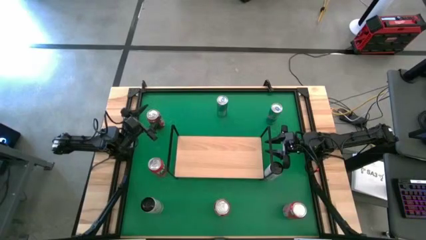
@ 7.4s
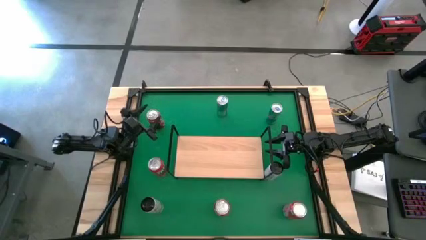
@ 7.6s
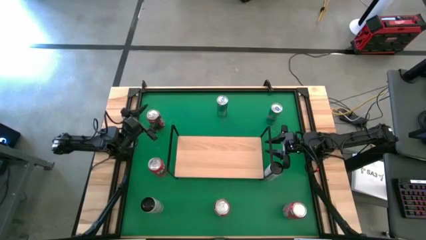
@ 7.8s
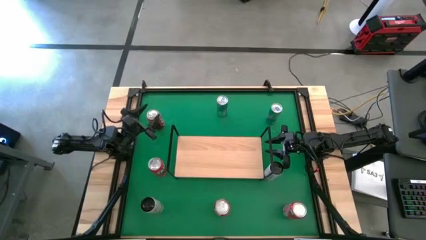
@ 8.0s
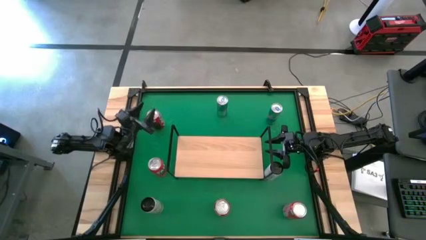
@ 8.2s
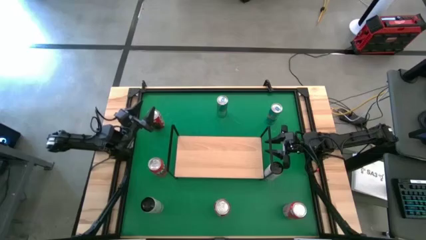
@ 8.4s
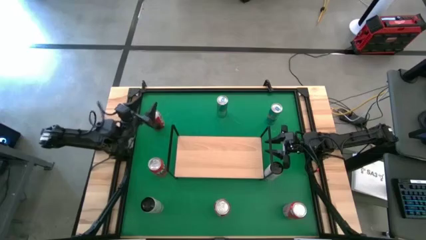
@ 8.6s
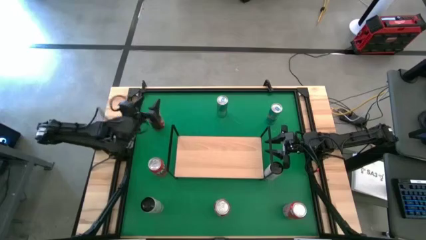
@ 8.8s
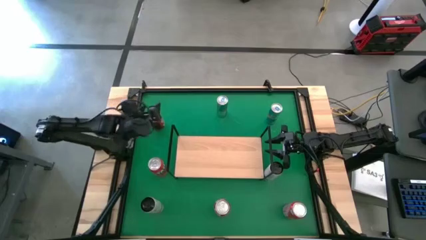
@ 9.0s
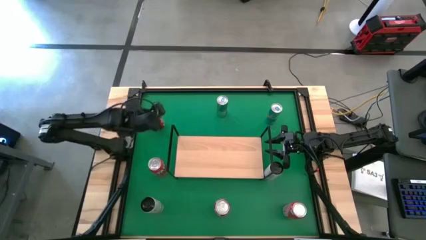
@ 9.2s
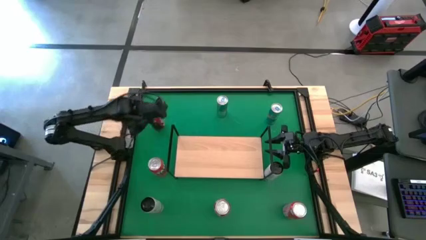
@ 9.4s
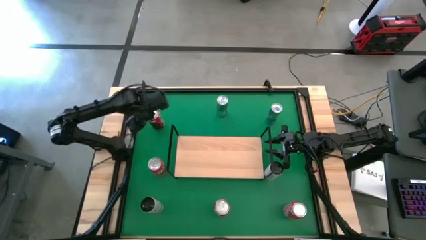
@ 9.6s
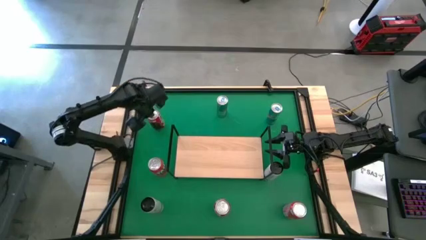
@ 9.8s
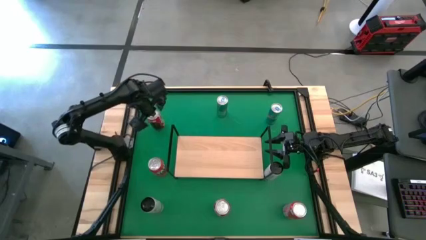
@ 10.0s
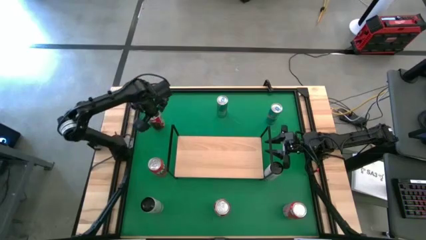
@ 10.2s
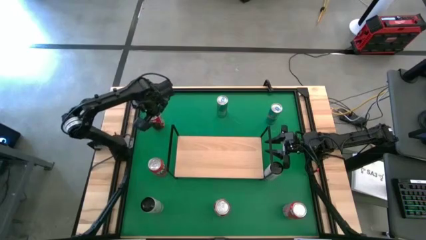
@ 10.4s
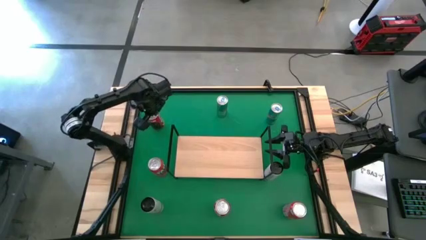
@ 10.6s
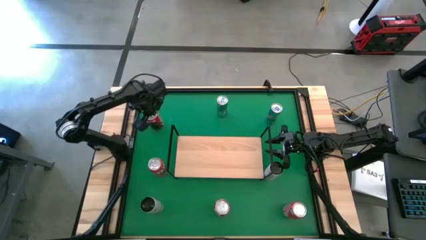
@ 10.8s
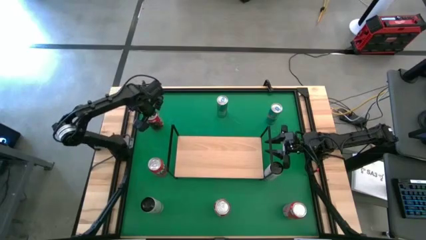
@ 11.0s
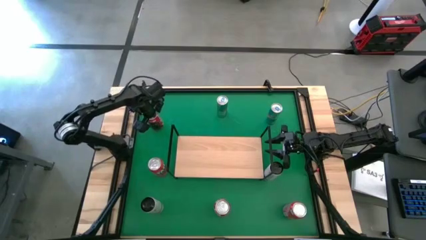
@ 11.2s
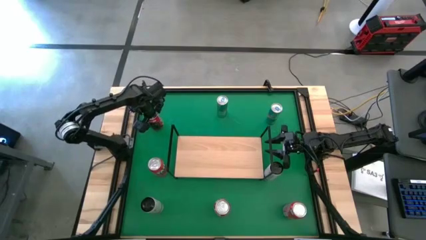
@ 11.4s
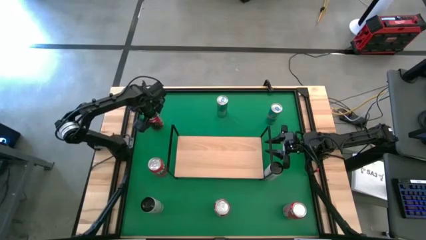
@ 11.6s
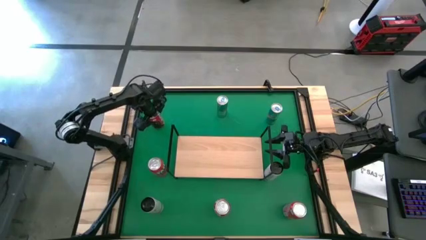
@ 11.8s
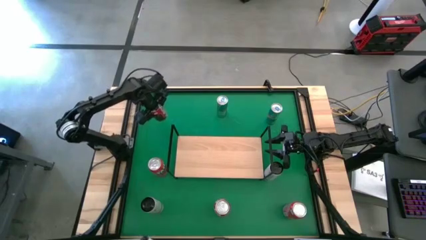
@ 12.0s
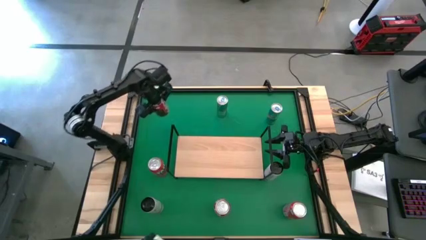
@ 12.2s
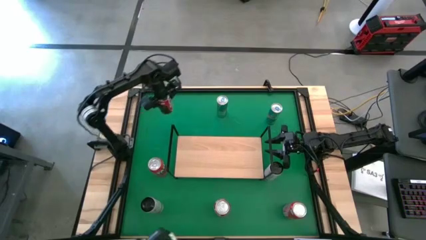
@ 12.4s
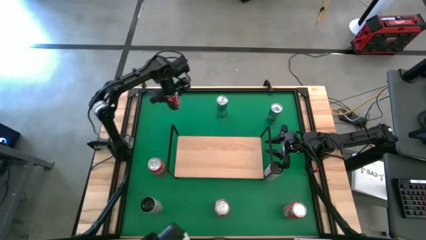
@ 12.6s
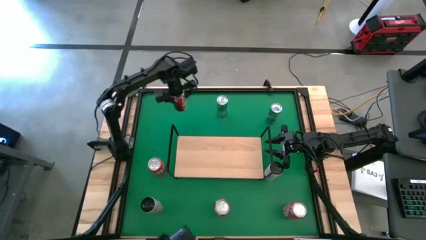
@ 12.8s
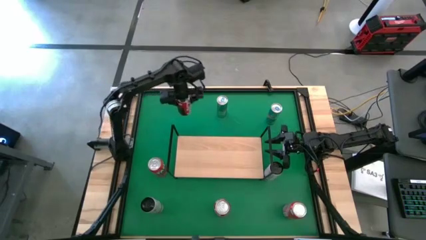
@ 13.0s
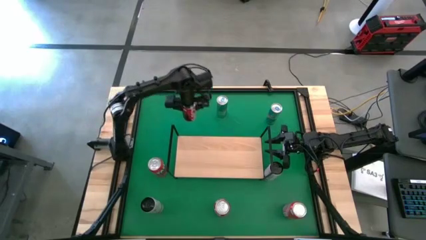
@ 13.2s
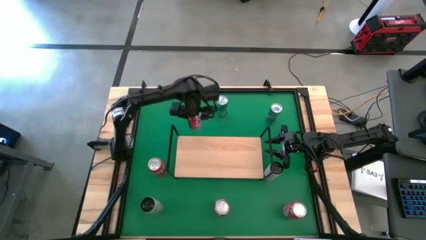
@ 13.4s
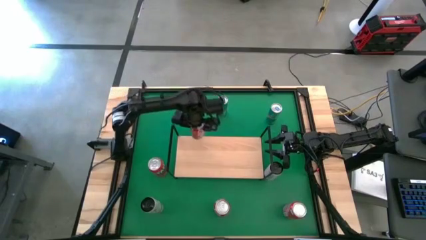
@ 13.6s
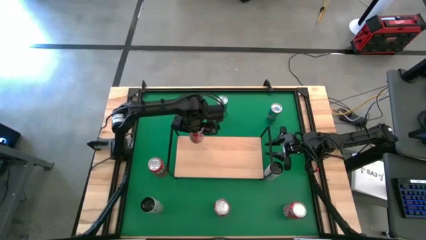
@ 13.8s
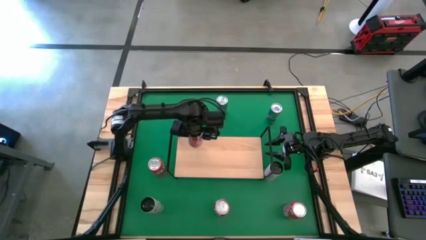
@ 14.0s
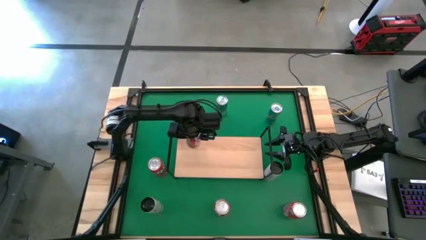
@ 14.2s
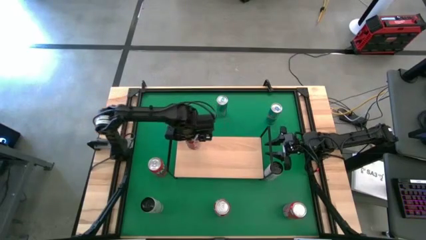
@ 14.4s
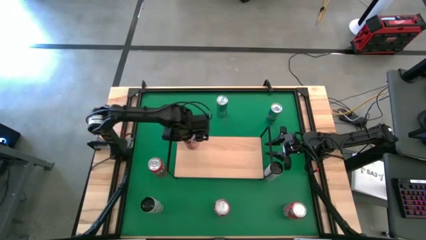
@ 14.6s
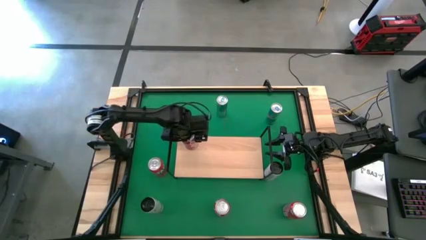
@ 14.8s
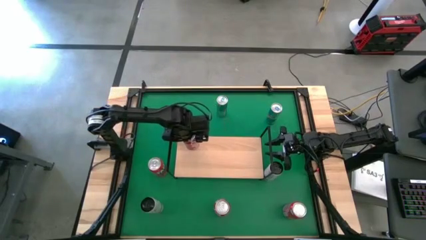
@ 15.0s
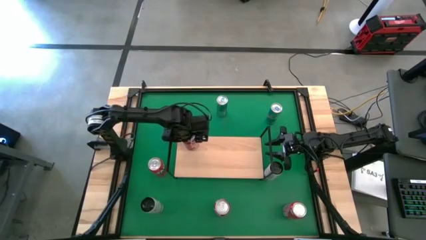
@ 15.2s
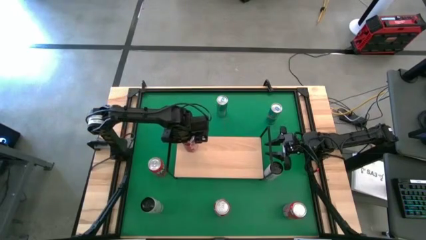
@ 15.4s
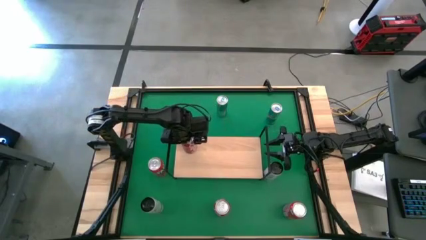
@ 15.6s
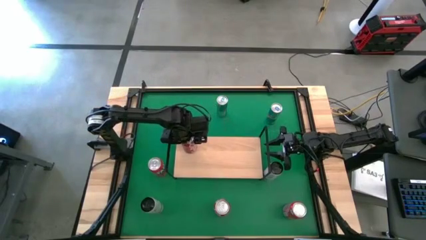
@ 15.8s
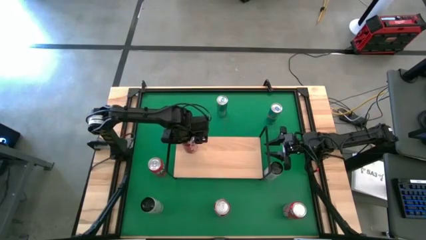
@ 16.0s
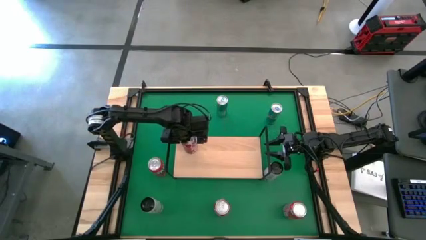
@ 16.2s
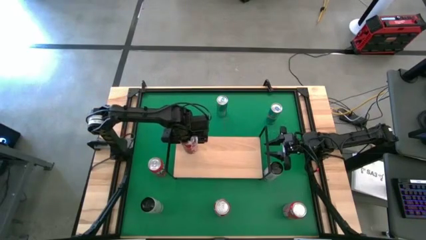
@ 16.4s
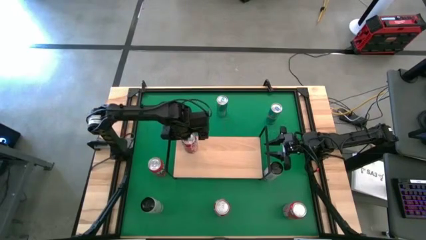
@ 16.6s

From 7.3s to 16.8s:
Task: Place canned beverage on shelf
Put the top red soda can on the shelf

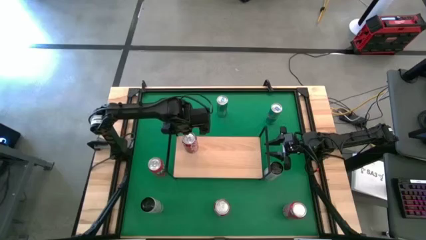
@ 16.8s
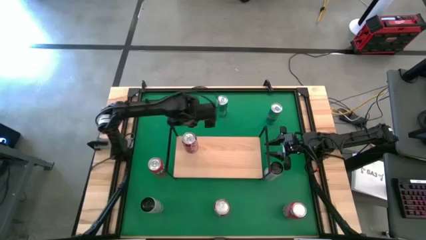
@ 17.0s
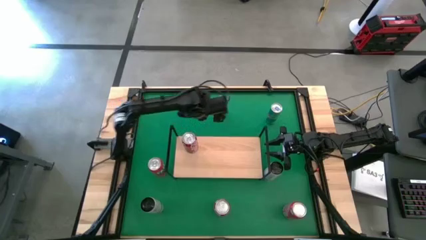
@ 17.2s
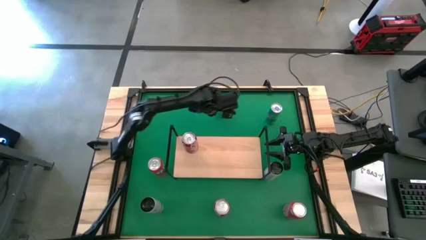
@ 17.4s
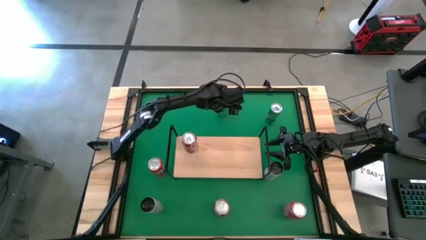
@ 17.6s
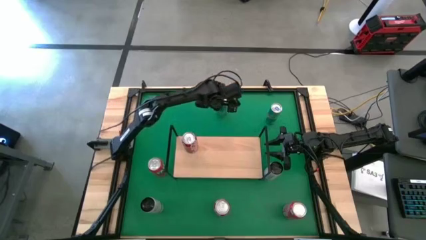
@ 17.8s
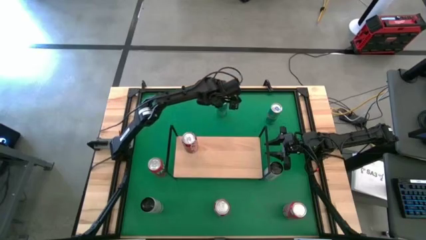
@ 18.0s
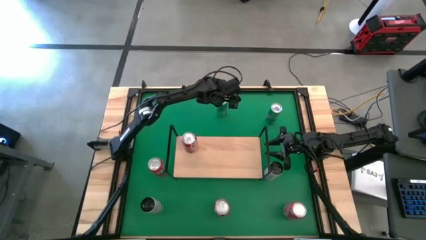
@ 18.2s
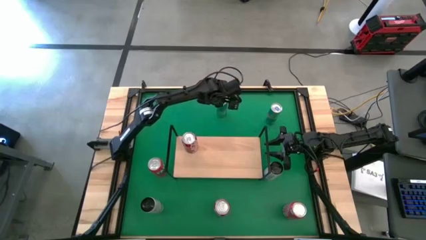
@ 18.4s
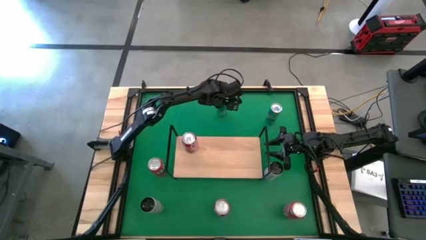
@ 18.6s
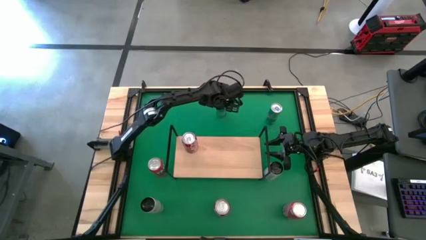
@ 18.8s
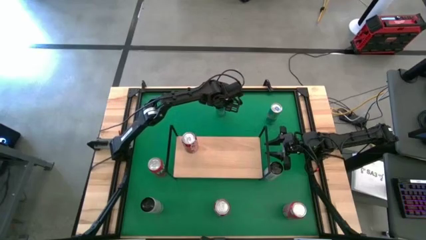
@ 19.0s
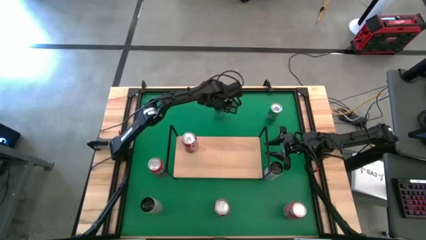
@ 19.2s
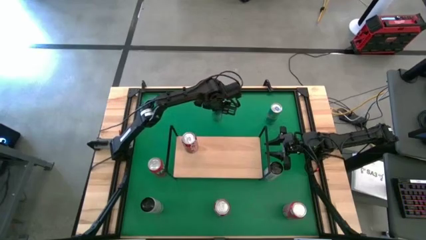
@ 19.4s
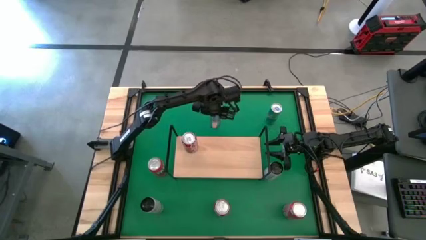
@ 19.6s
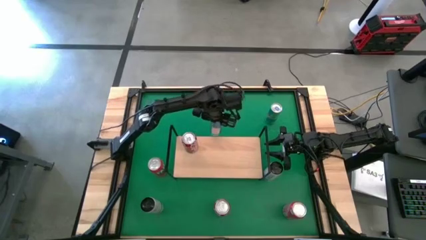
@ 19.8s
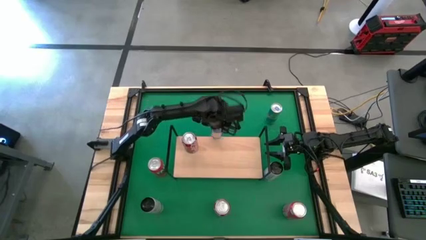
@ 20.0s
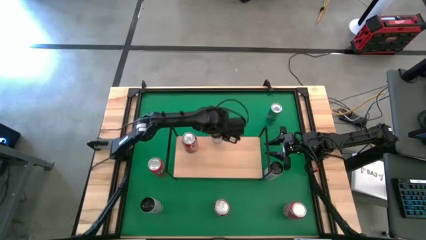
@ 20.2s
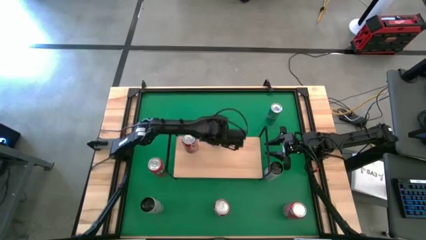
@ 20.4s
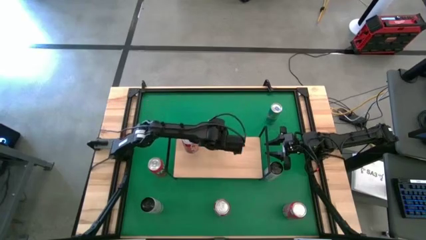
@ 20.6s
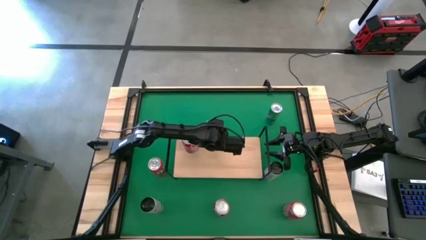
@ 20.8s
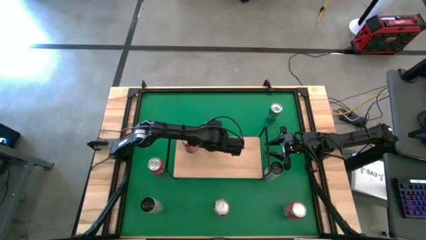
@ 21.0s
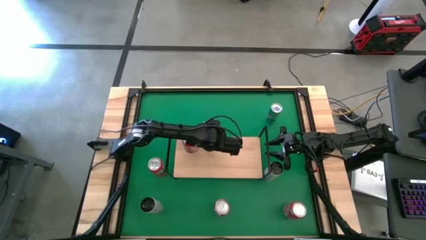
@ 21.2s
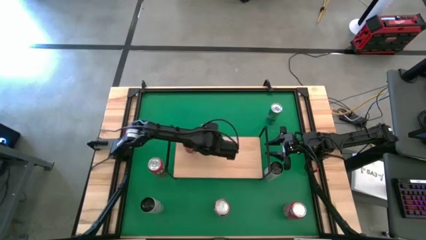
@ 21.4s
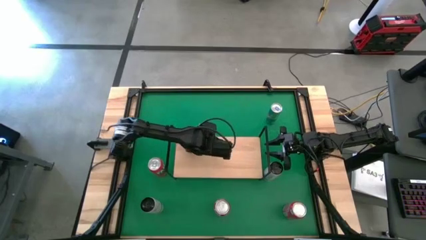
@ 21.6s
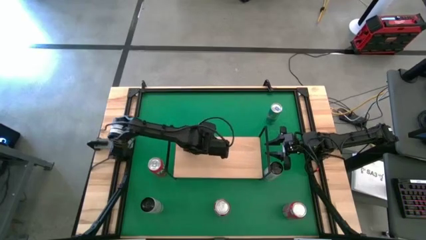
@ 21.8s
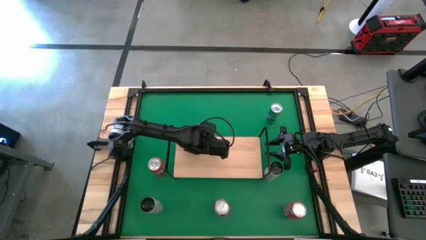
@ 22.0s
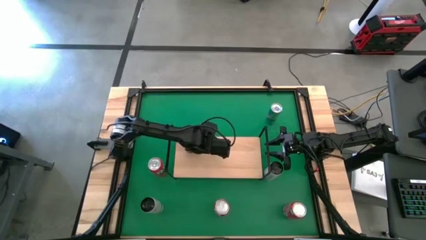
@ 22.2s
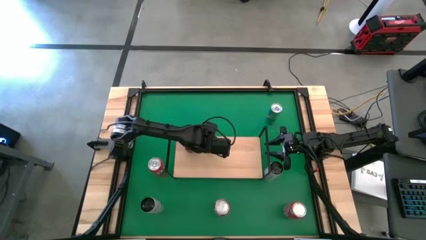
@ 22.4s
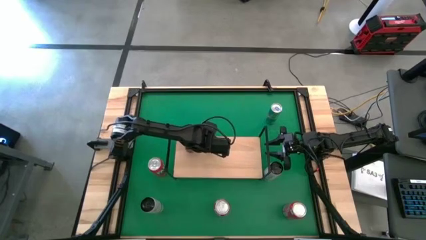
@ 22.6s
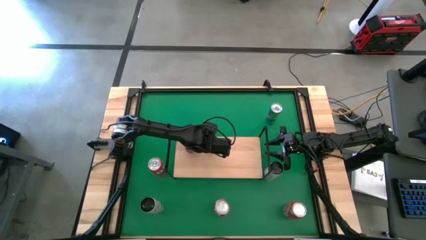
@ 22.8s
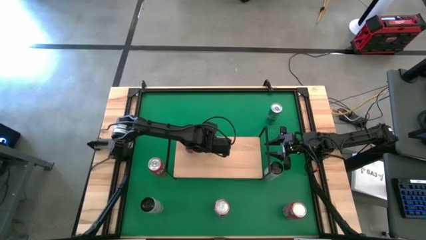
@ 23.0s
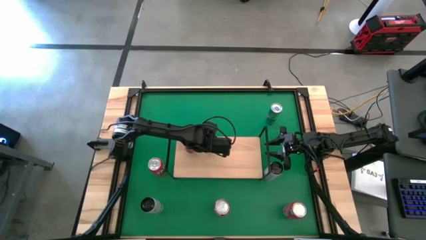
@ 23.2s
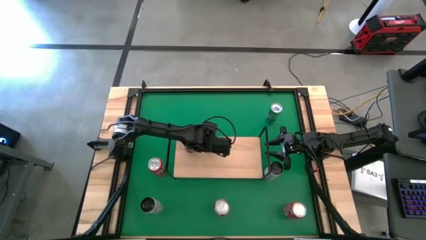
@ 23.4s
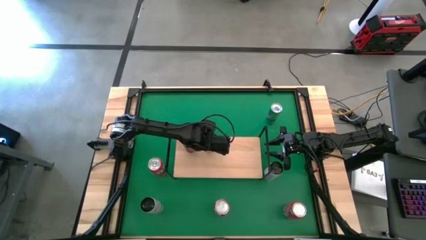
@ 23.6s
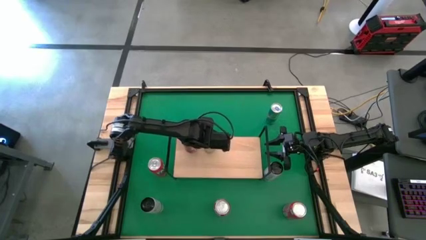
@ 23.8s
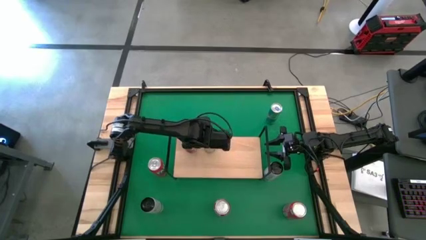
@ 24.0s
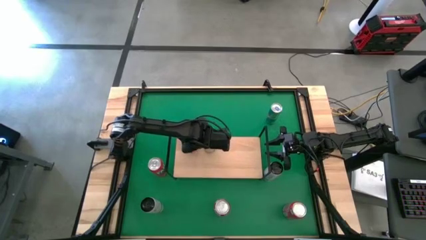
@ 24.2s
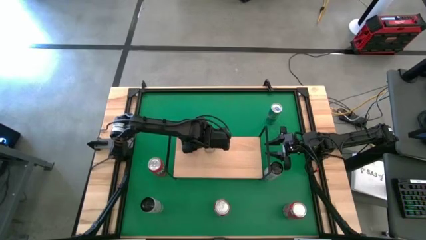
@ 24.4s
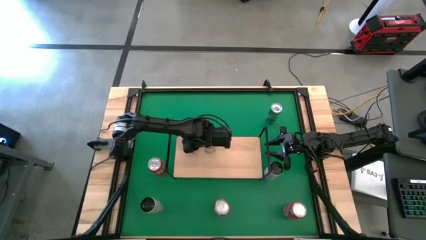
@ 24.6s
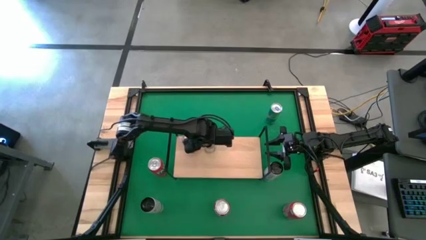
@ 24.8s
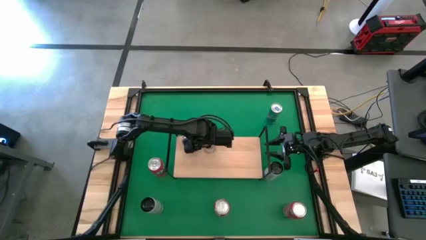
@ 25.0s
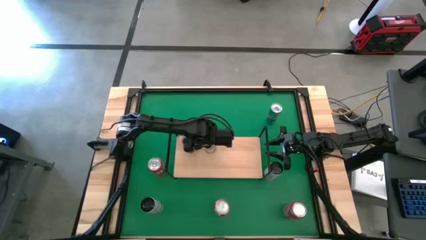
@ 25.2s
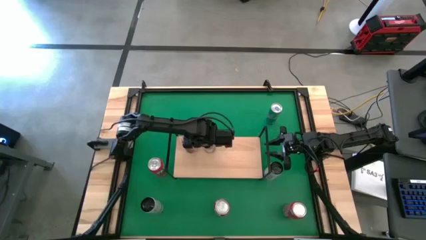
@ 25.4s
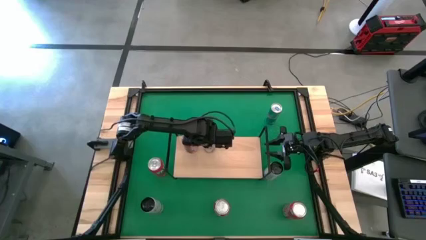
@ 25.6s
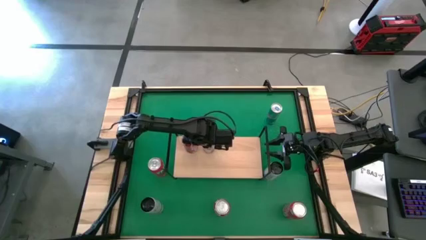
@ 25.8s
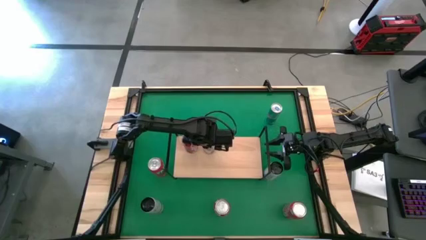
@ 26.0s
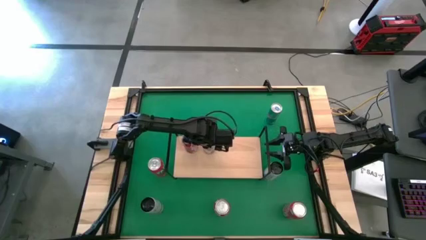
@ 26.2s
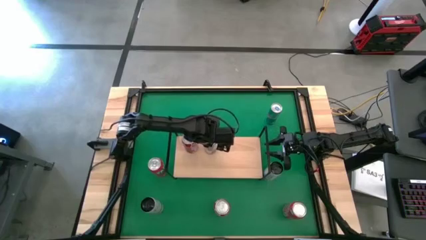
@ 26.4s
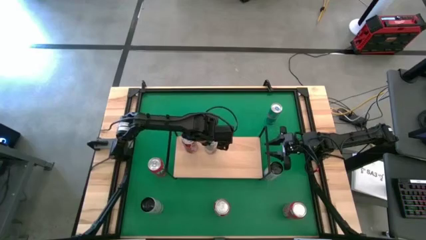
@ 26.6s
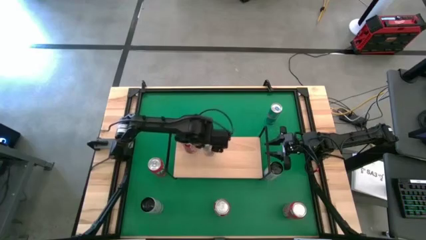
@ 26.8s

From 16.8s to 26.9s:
Put the left blue soda can on the shelf
